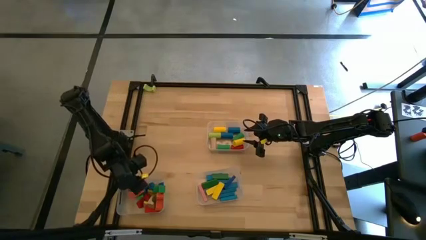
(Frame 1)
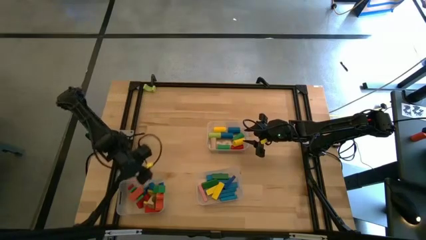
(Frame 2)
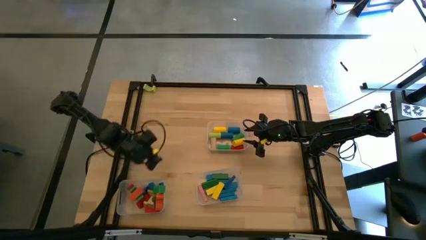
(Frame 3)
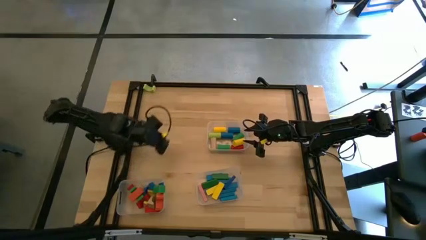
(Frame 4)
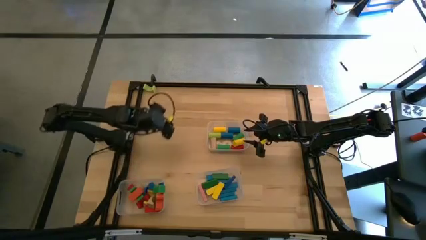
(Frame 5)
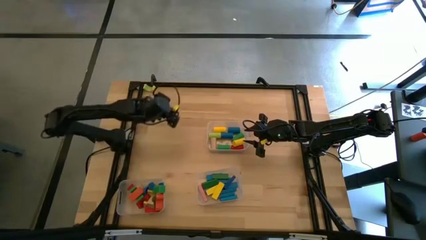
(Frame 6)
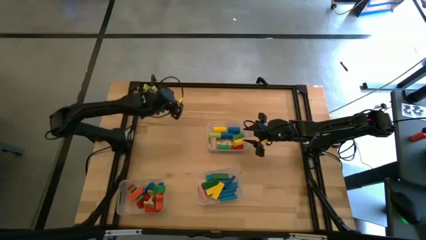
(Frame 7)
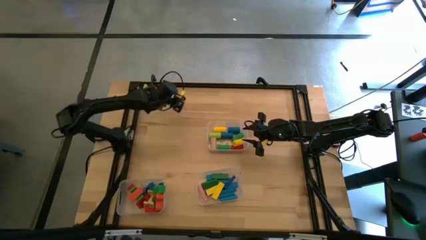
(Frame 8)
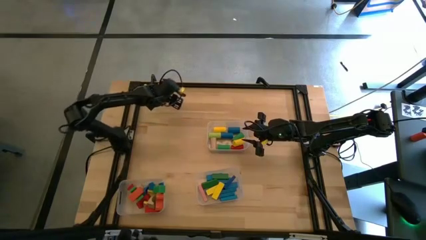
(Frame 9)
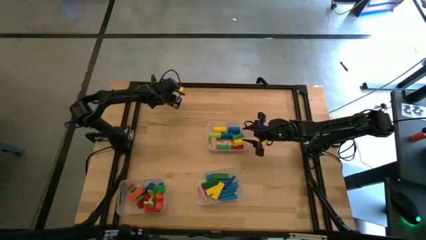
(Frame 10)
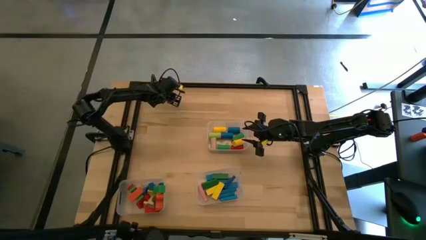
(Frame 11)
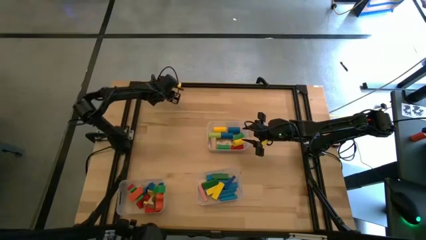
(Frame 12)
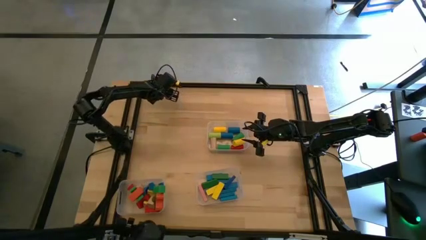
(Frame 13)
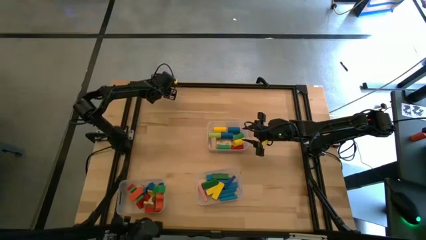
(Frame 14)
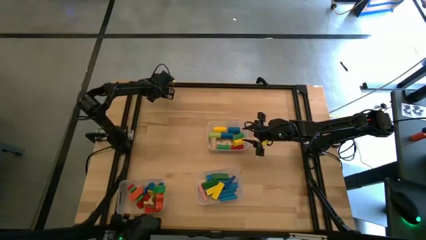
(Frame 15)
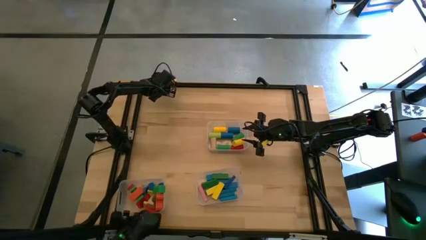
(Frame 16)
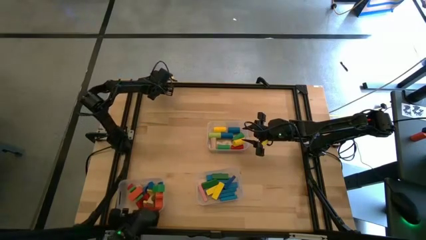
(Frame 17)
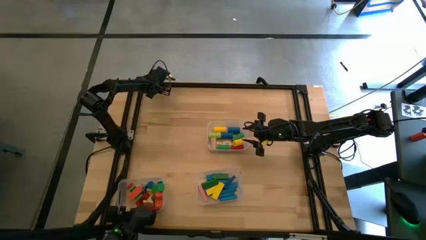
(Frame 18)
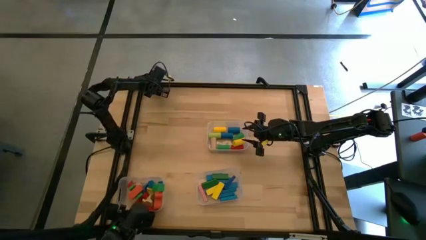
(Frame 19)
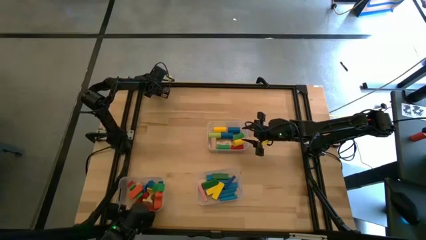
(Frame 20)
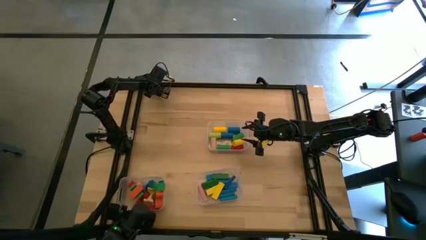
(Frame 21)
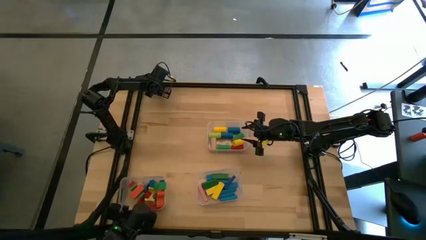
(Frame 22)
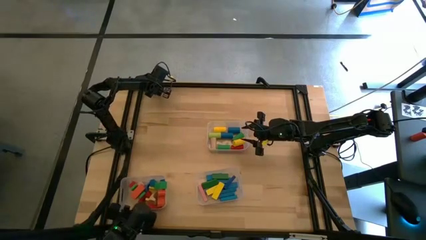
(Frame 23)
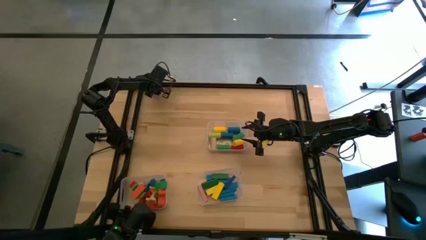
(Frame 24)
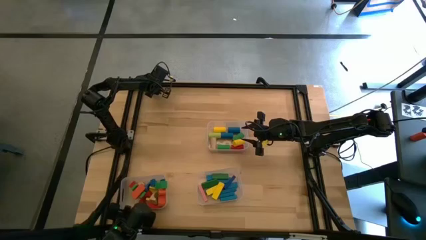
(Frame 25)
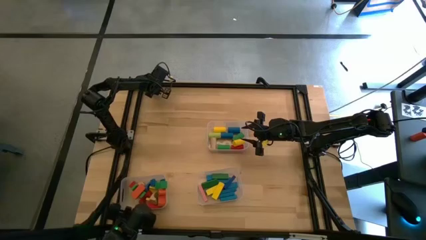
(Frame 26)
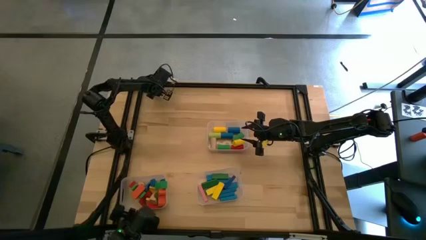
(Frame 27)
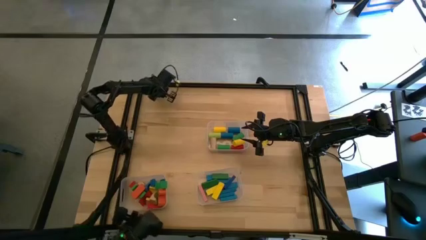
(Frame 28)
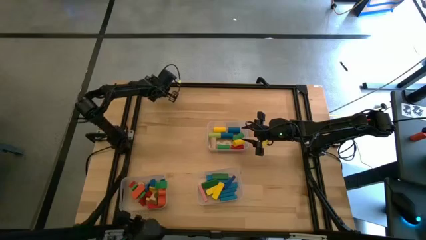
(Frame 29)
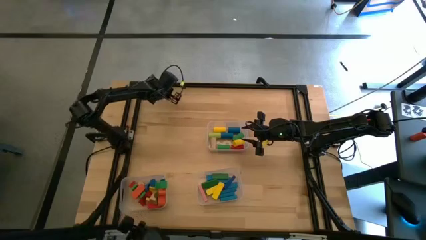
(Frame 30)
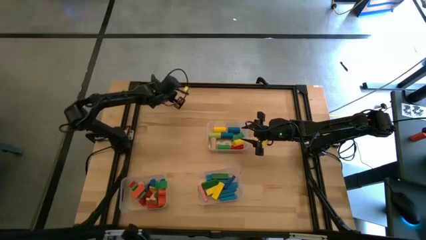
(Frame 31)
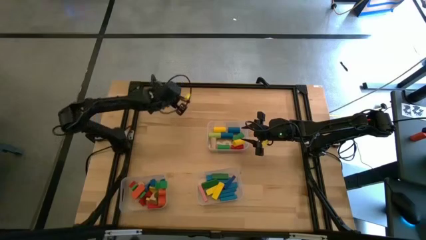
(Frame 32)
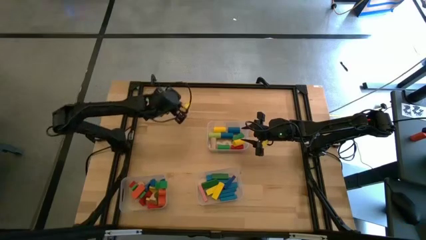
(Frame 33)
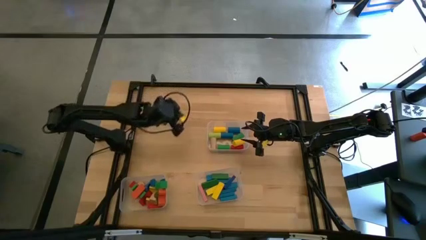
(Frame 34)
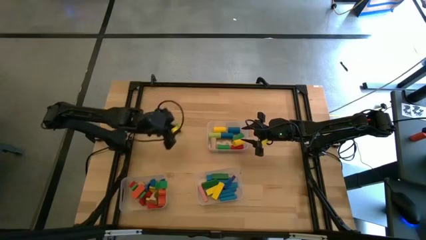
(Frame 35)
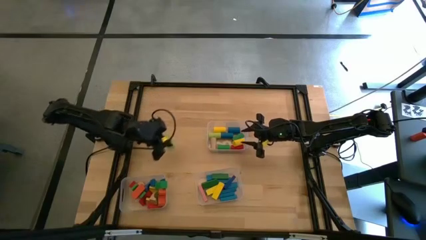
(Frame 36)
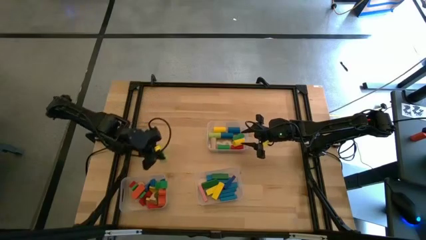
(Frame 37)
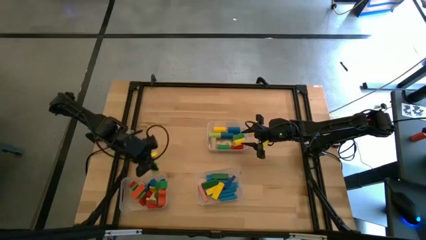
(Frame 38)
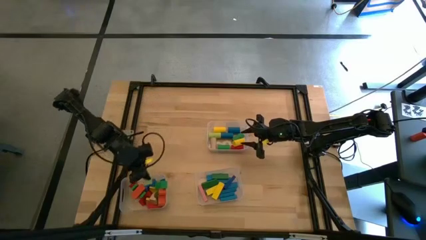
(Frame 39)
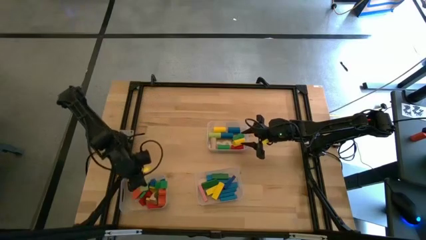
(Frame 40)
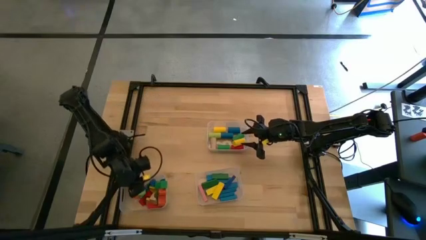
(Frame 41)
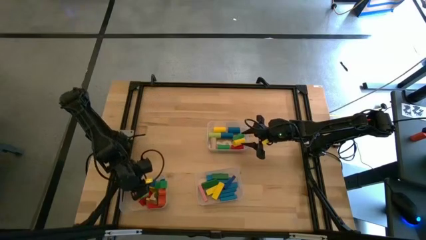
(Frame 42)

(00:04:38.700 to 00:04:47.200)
Task: Sort blocks by size
Put the light green arch block into the bottom left transparent bin

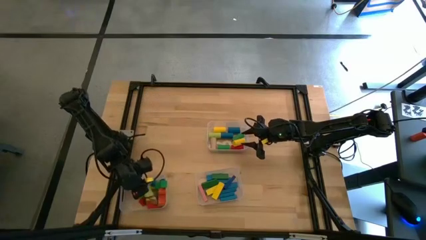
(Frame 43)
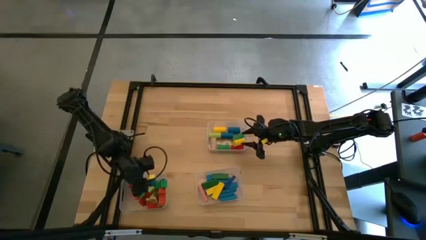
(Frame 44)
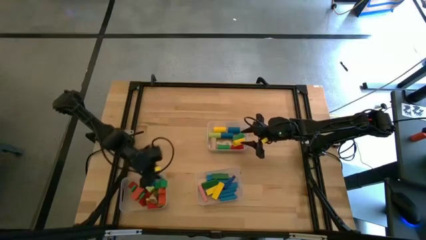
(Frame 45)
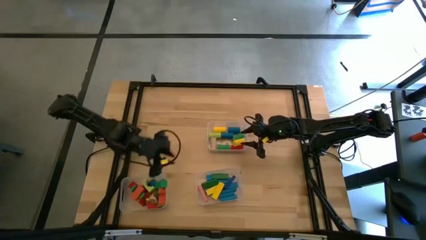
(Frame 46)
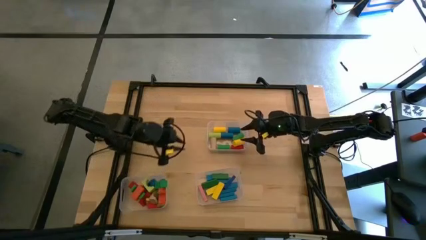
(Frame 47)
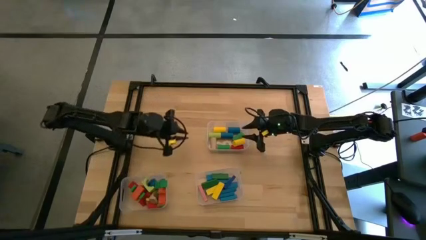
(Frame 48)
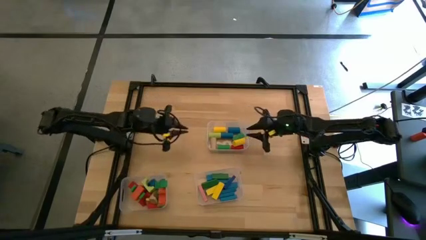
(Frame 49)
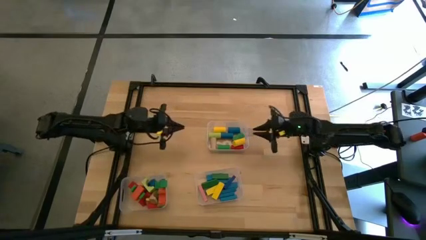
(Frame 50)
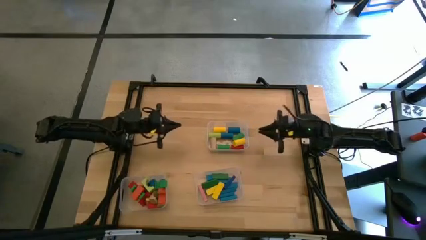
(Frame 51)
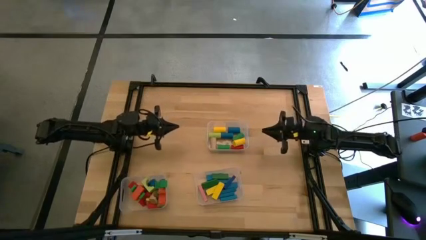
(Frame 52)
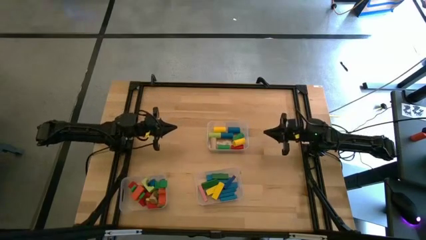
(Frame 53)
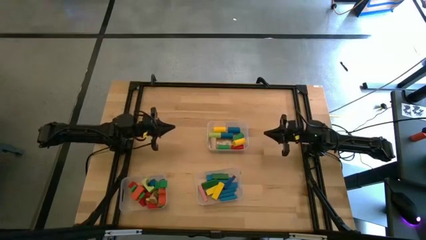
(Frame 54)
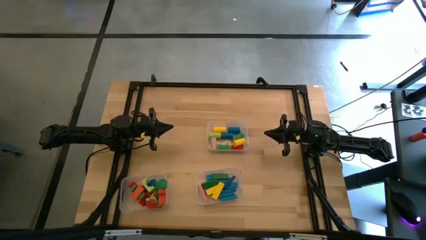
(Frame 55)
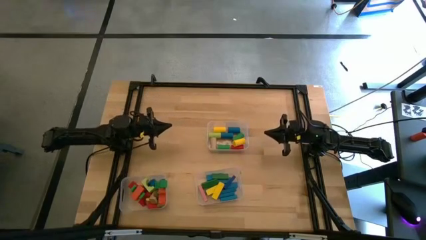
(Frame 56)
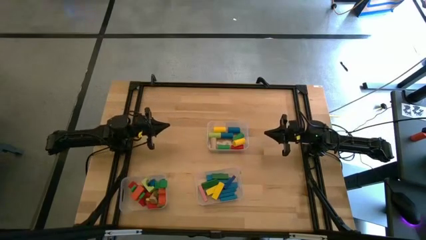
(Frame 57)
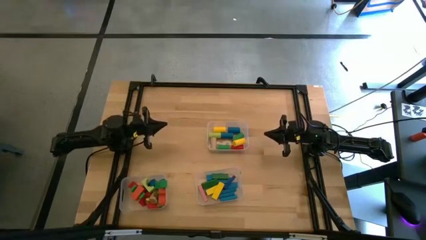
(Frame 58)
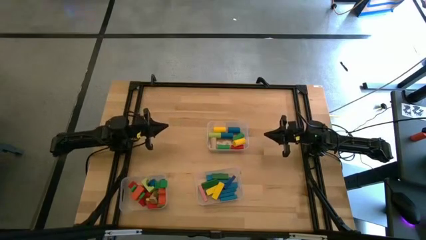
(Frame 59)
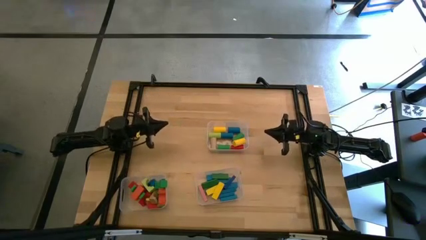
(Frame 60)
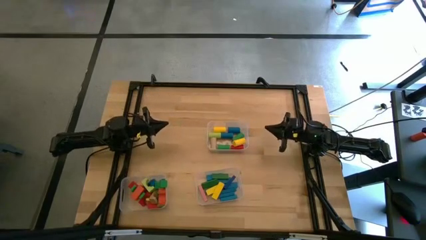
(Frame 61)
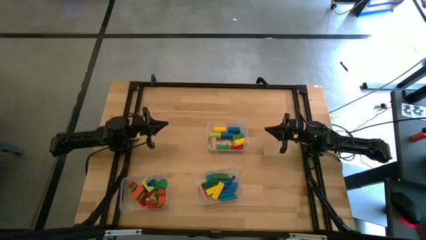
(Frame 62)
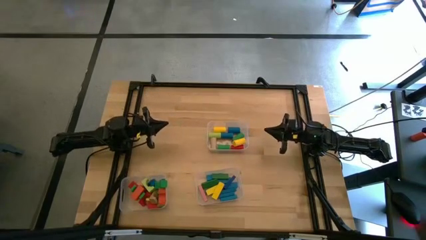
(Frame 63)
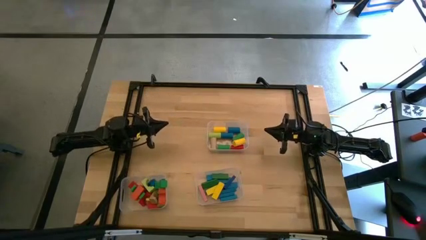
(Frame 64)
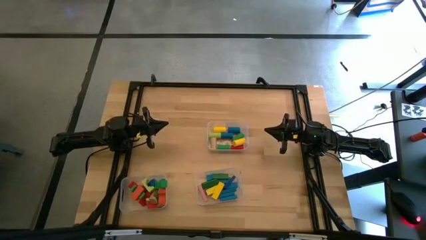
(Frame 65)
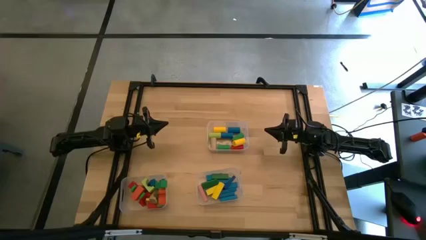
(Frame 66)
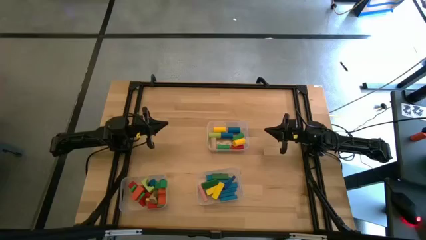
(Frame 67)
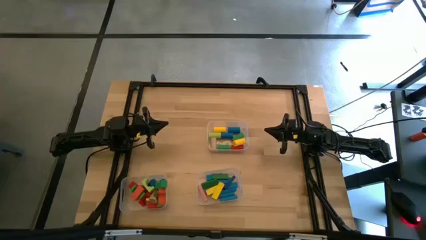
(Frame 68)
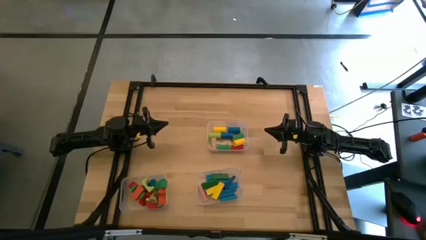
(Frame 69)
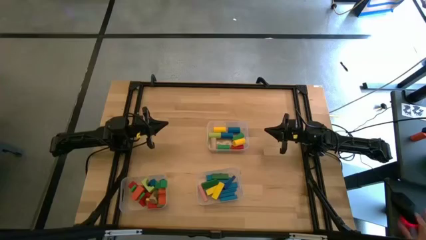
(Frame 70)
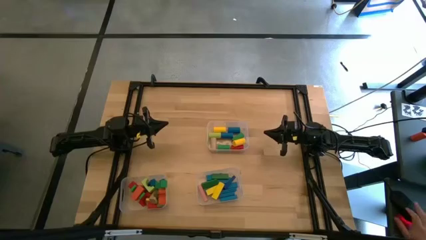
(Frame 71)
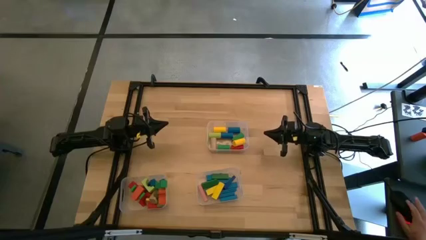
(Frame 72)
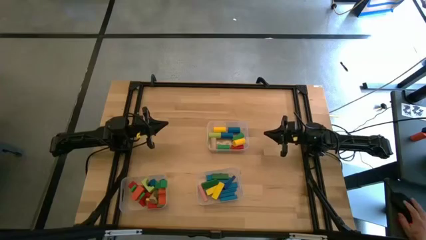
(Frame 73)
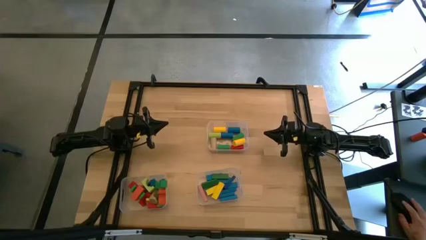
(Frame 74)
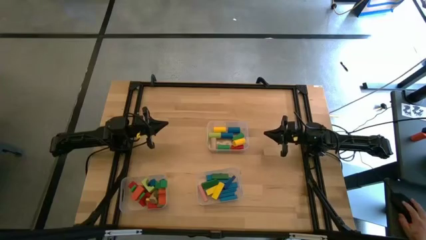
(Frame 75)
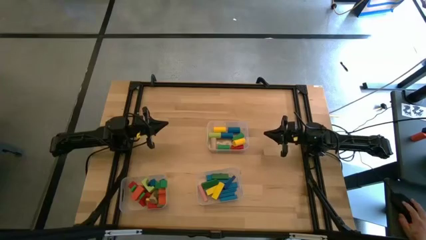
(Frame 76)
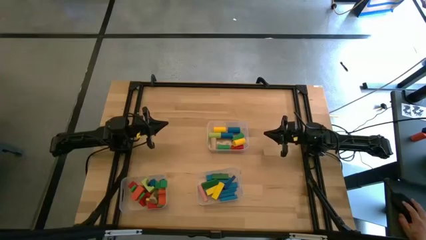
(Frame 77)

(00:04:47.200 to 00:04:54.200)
Return to Home Position

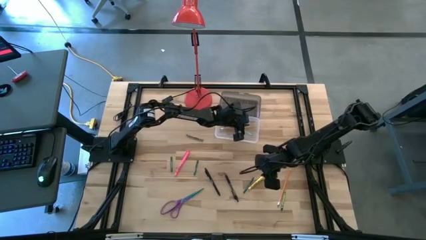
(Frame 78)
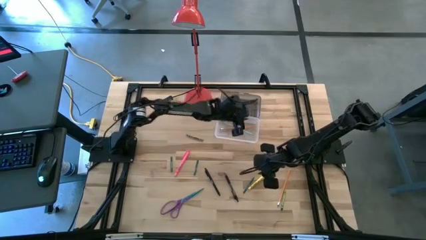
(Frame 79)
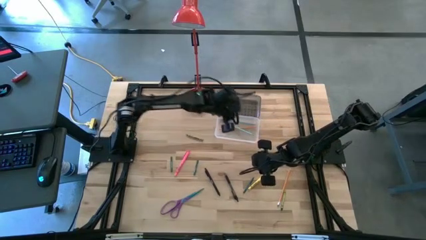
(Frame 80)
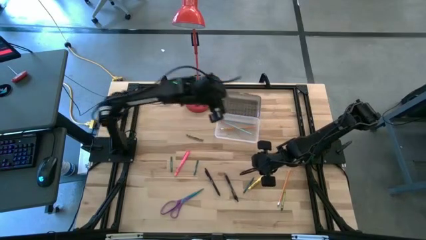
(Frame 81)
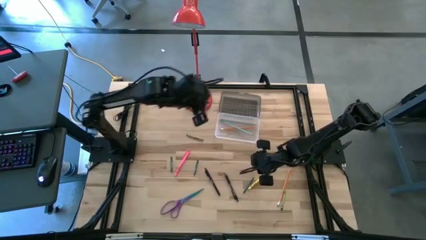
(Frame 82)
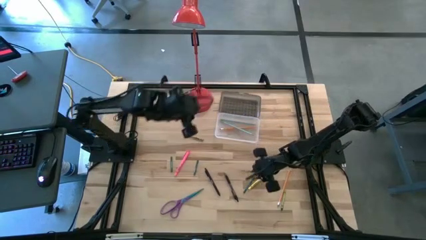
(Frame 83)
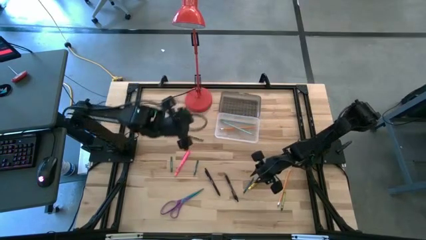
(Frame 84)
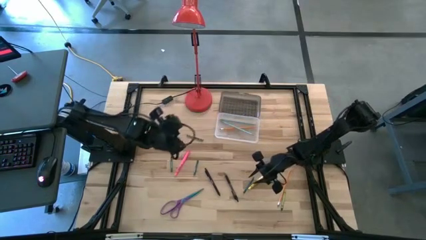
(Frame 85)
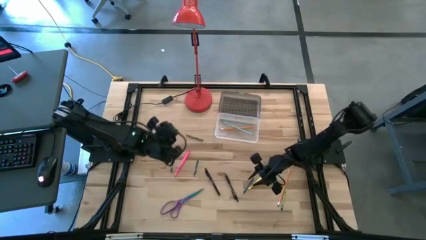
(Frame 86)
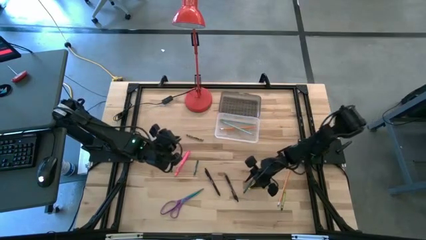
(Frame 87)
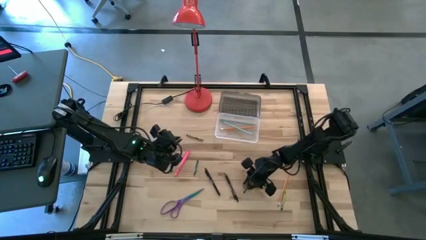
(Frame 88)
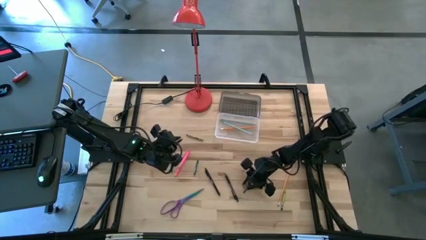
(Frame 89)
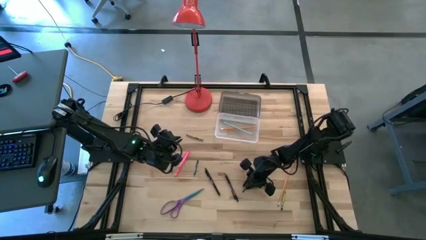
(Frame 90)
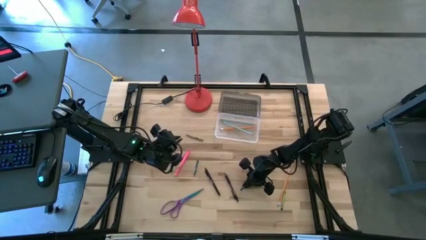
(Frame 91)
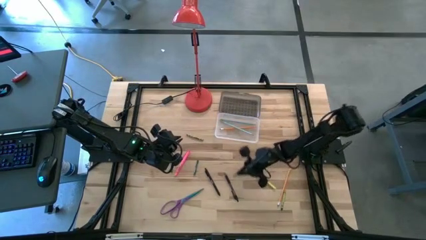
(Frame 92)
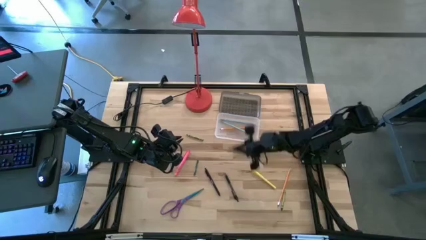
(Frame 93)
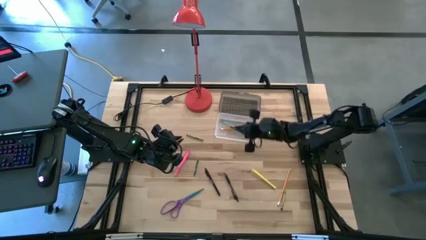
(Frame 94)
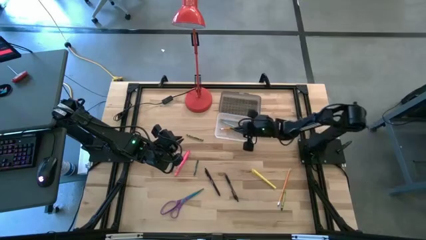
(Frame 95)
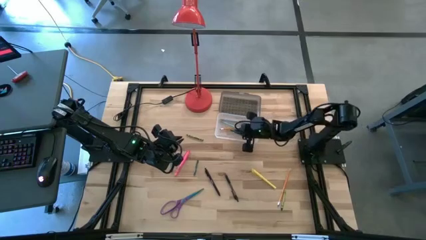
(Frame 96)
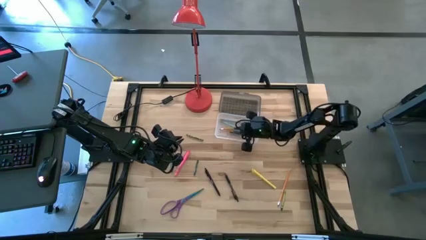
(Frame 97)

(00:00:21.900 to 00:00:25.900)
Task: Pick & place school supplies into a supply box
Put the right dark green crayon into the black supply box
